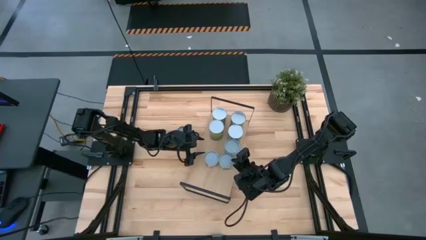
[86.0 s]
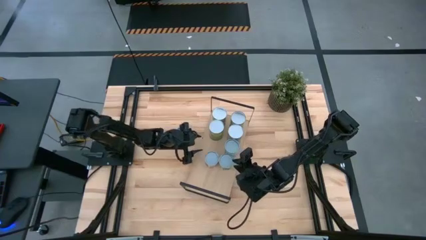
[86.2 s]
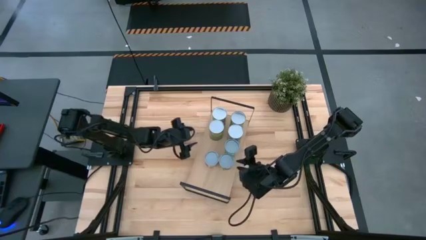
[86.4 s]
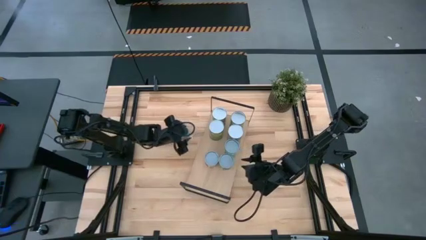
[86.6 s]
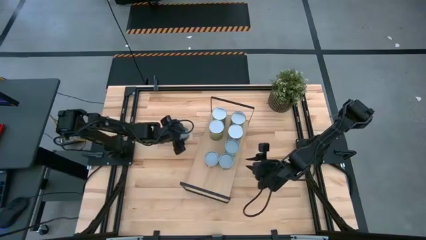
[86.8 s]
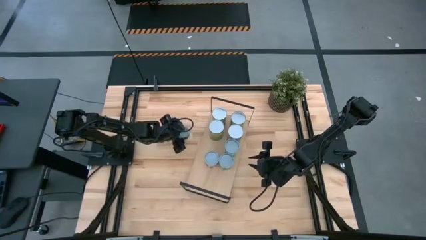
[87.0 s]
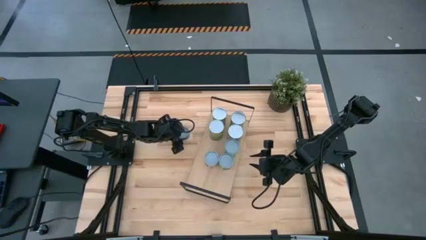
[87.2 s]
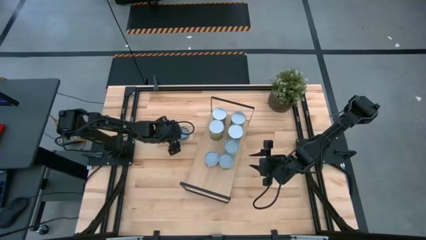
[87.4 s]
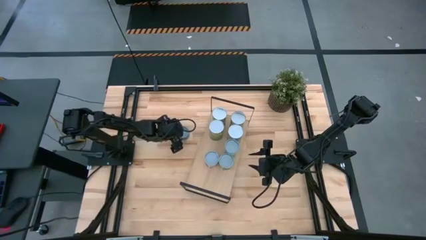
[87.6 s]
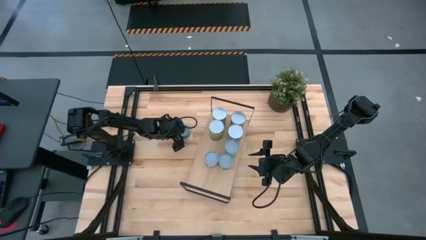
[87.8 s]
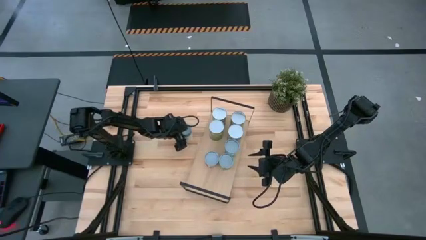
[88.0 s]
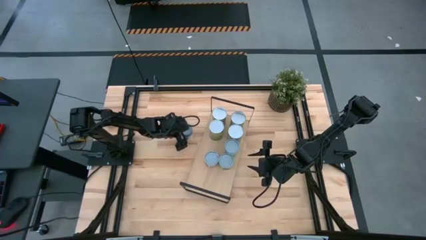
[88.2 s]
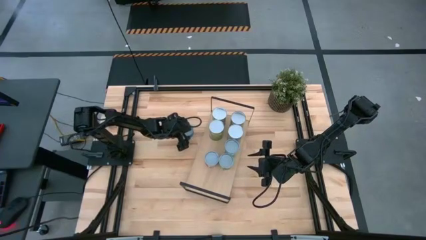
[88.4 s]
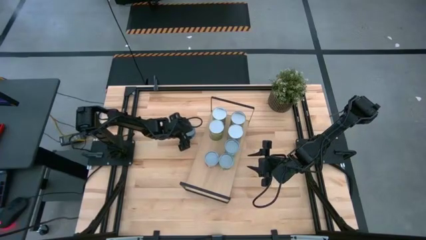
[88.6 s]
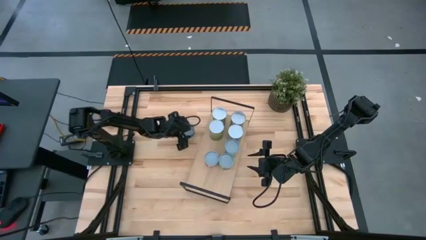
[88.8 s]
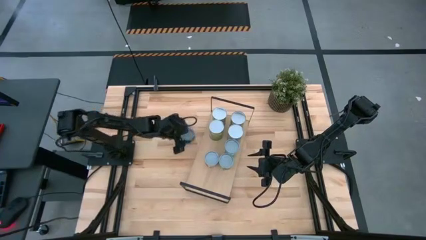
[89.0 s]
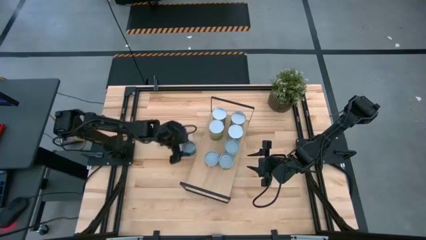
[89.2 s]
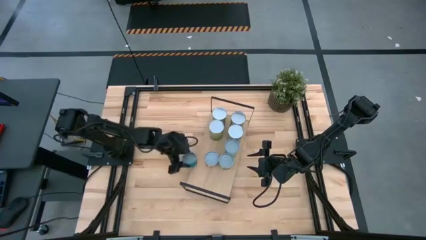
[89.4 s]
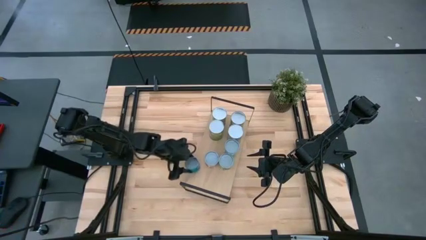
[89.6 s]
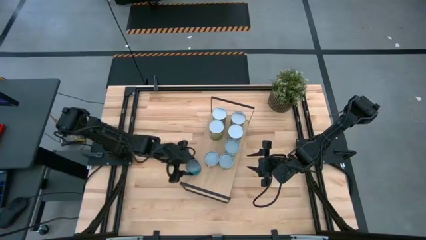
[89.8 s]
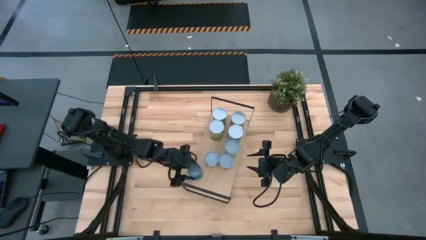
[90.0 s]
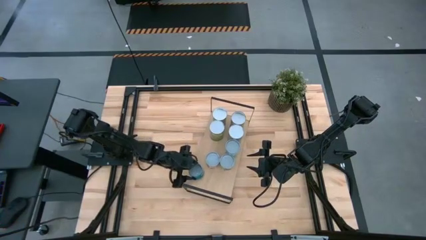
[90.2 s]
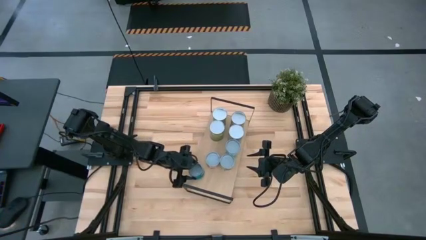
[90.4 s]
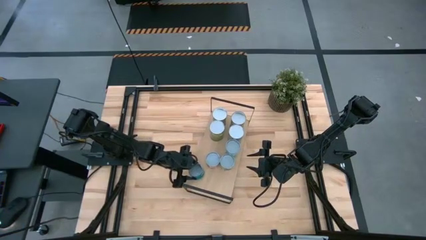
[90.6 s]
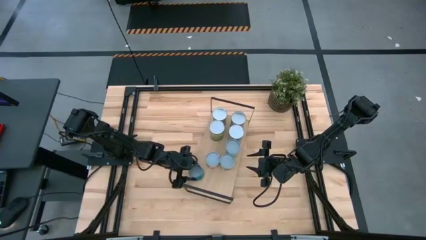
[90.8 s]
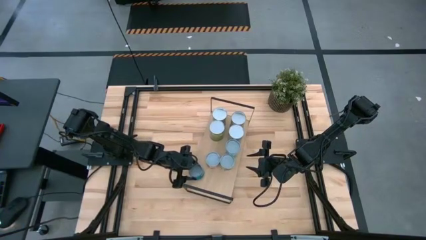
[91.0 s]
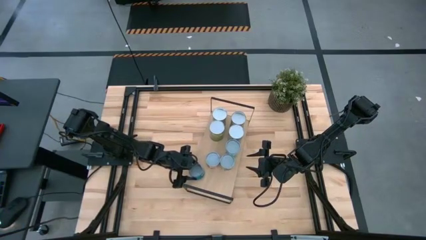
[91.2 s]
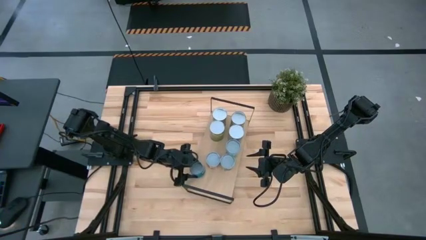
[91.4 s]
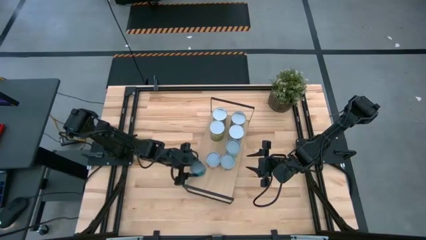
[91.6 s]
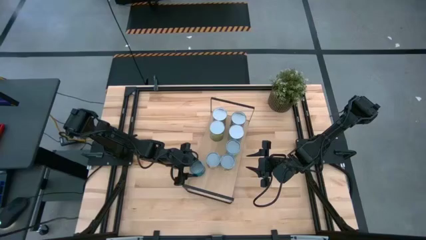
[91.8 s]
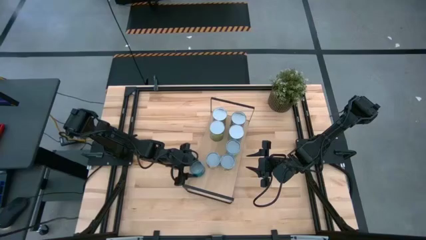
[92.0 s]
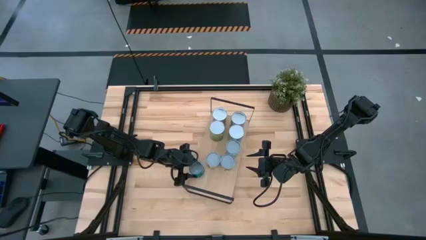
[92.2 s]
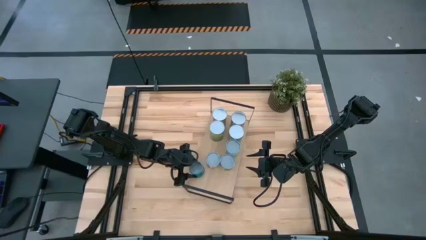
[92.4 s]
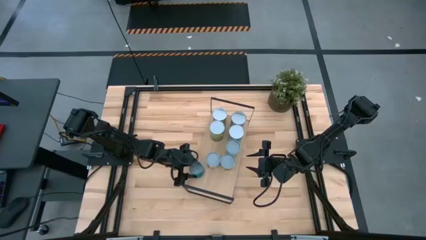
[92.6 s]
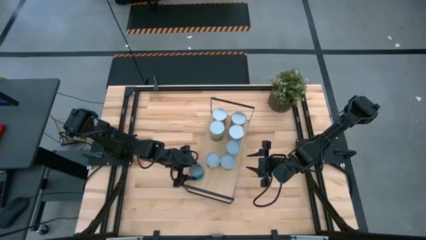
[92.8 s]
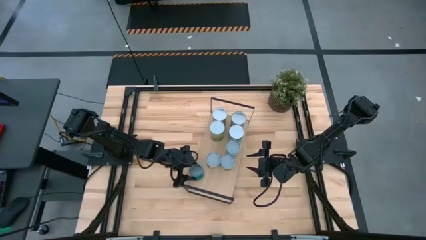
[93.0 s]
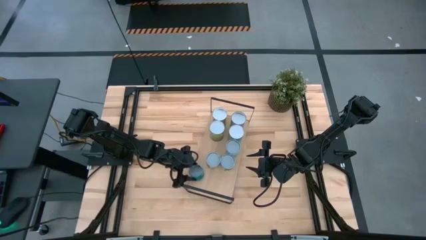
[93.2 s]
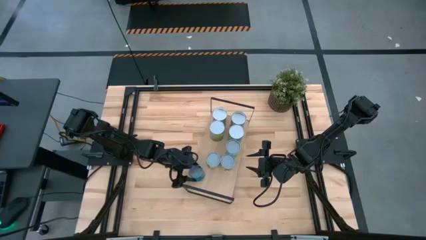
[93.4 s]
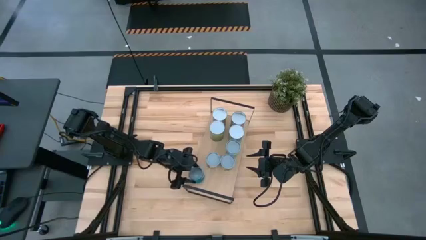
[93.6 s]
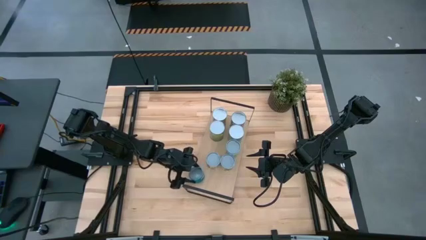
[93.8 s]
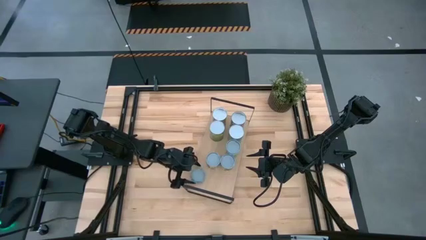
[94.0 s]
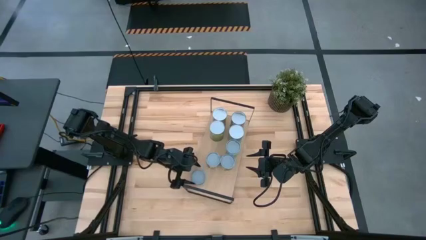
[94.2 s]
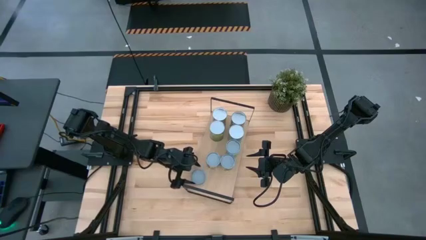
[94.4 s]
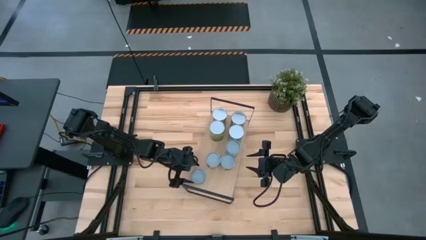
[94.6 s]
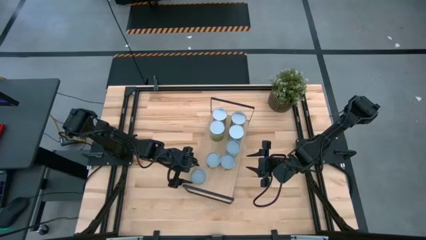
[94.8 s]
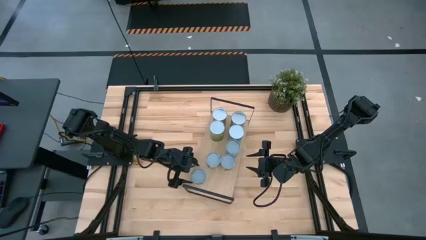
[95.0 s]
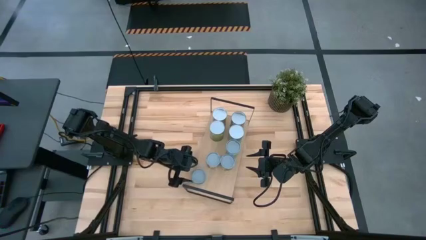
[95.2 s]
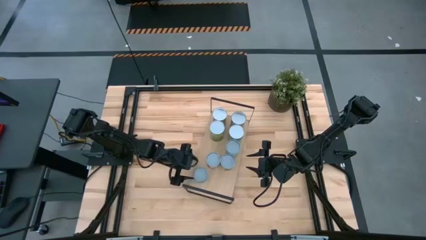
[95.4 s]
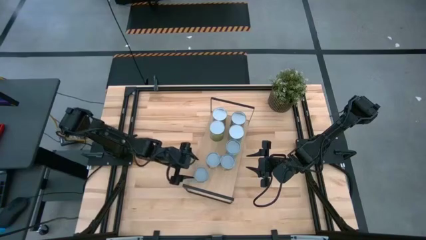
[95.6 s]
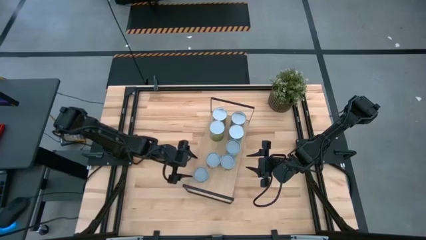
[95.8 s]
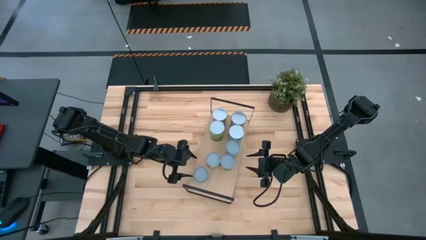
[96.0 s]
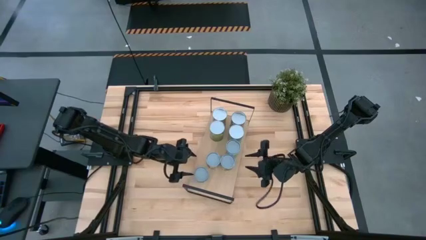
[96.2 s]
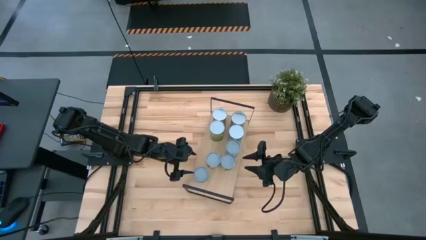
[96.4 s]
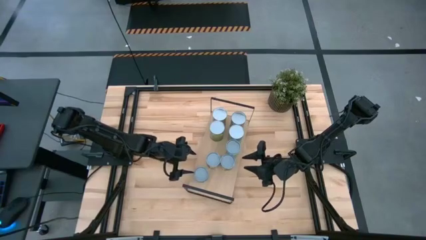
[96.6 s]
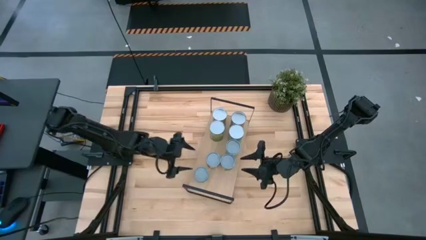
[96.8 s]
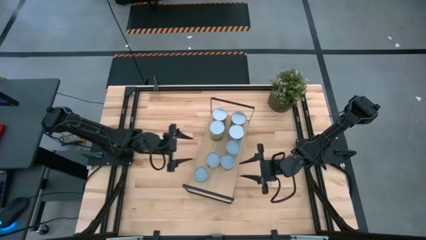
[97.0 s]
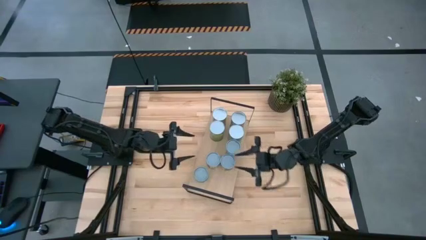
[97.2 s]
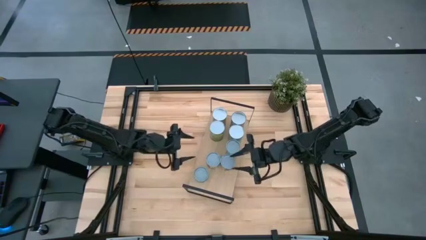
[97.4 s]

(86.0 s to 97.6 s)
Task: Pick and place cans onto a shelf
Put the canned tuna on the shelf

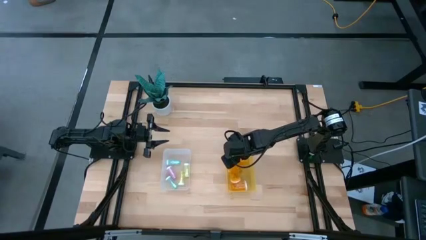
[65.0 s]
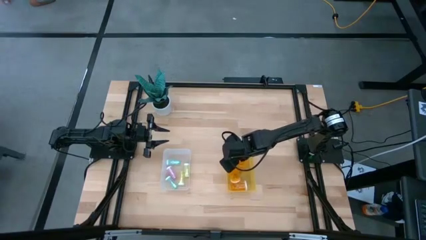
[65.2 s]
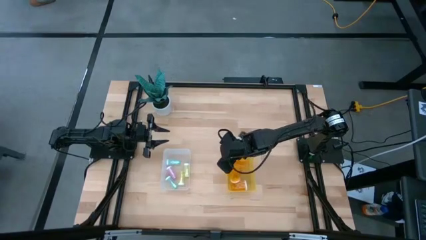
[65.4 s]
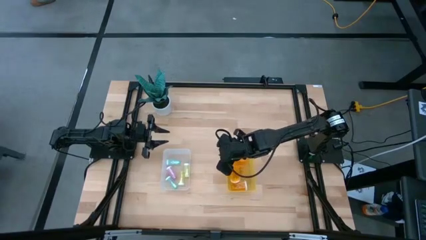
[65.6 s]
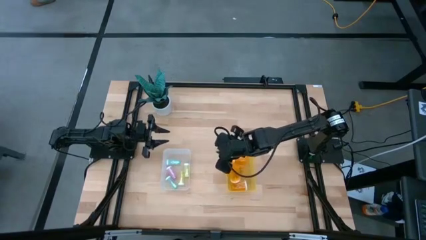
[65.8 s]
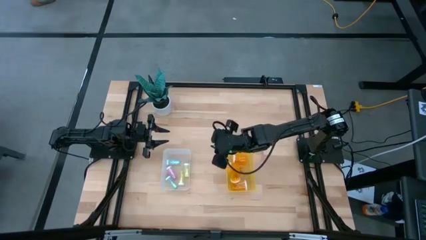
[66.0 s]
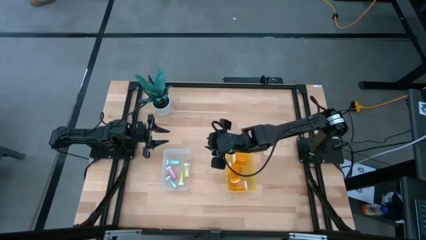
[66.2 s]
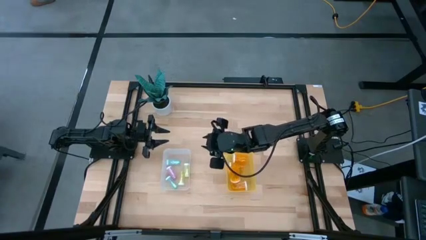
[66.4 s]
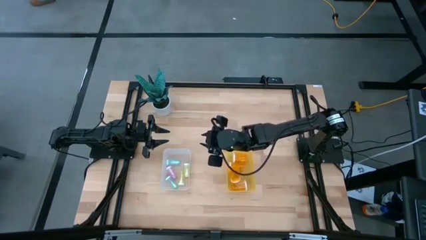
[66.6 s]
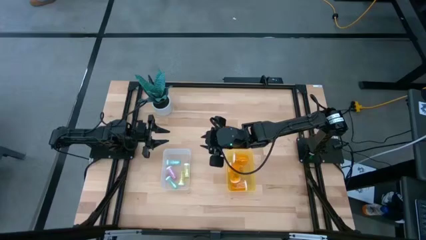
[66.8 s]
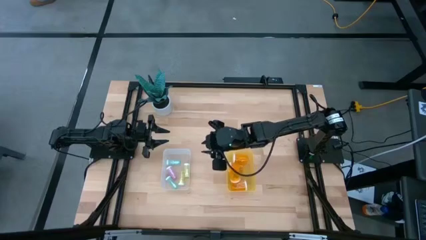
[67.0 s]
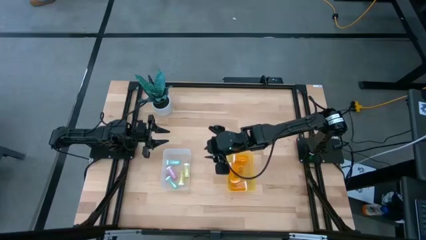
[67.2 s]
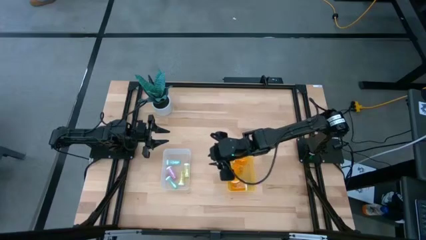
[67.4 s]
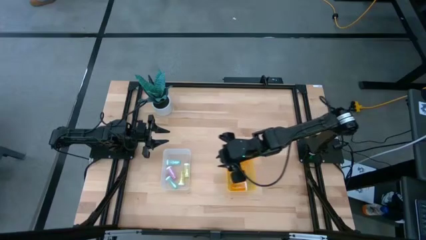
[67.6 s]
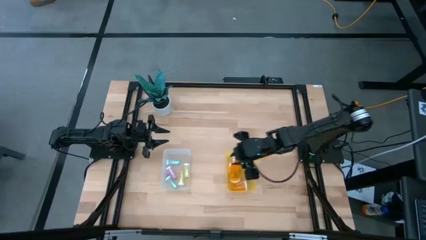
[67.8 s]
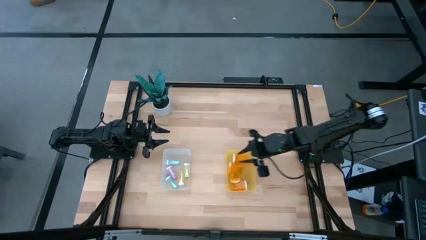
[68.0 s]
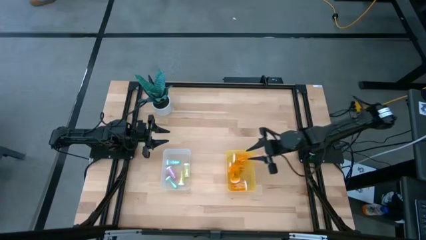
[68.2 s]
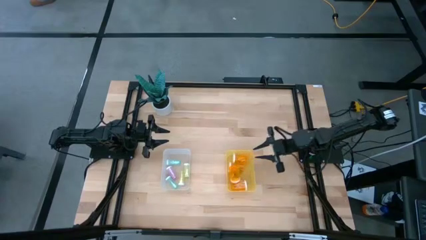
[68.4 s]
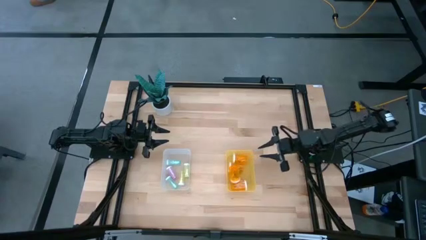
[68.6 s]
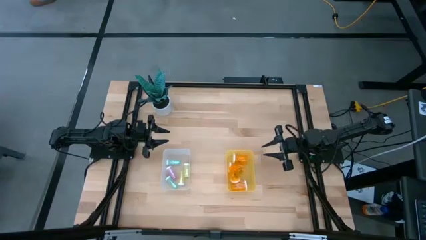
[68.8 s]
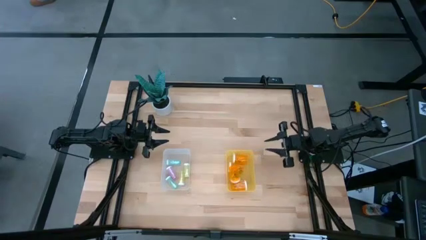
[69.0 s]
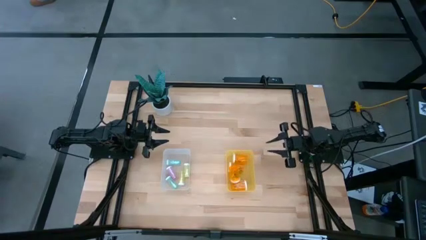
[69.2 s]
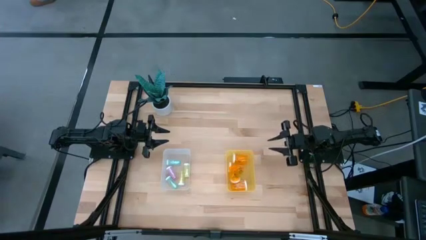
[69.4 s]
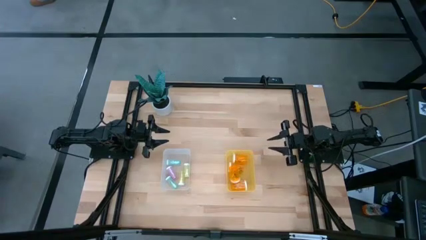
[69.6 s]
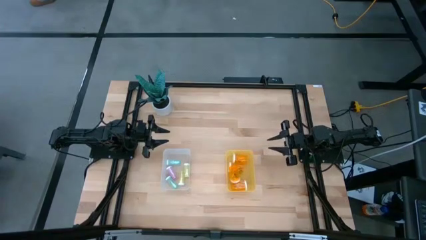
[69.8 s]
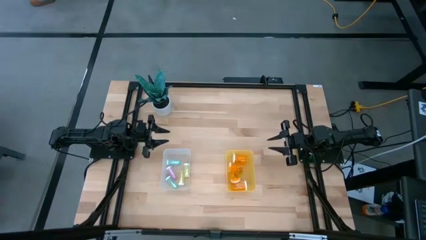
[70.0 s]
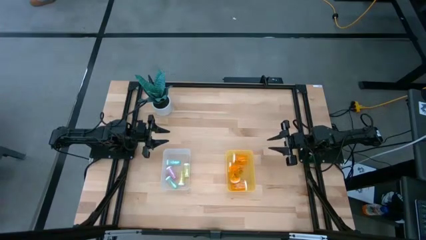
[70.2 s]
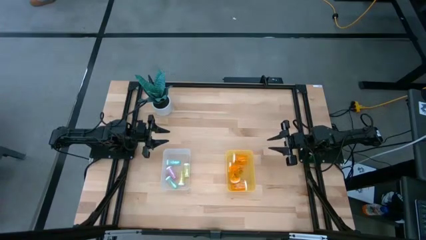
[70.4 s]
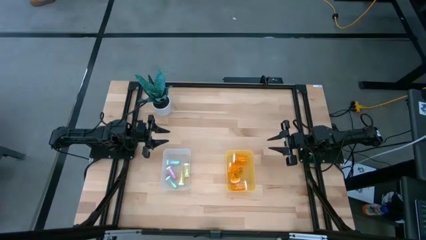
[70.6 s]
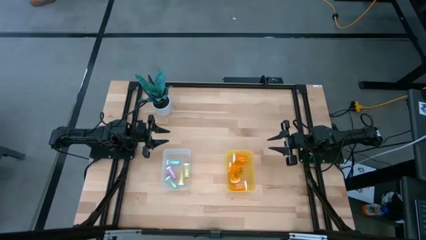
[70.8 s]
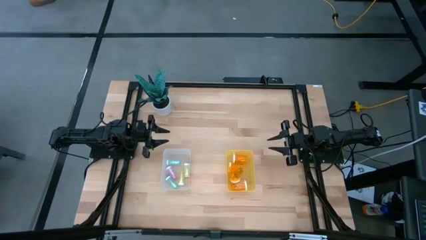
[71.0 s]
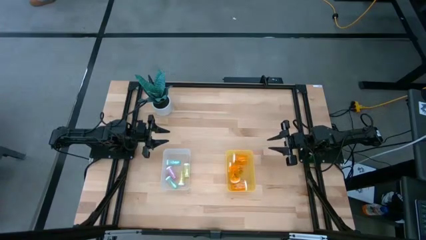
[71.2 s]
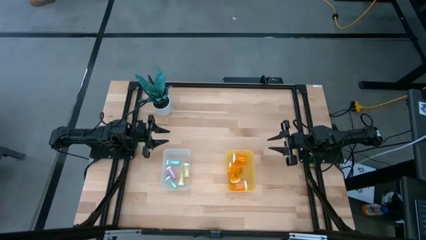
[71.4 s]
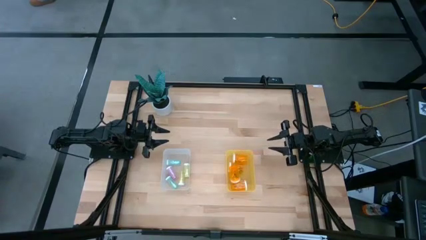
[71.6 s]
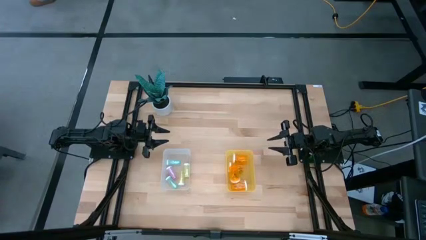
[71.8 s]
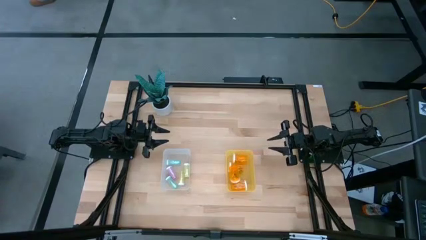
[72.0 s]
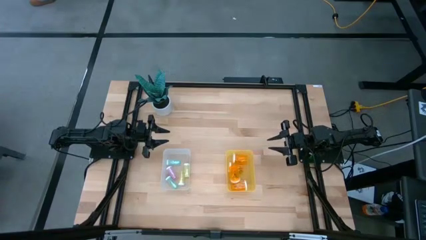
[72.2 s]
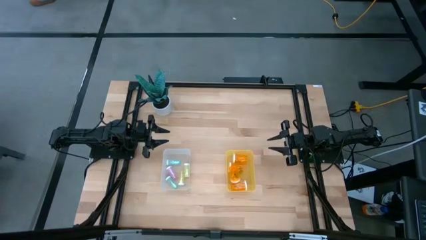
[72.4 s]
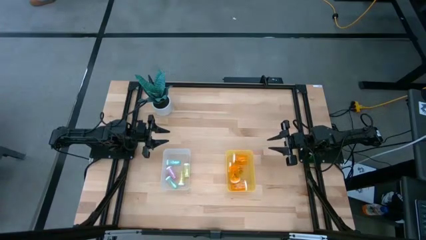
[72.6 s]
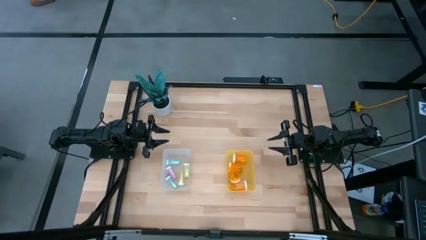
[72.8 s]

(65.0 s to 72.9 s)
Task: Pick and place medicine bottles into bin by pill shape (circle, oval)
Return to Home Position
